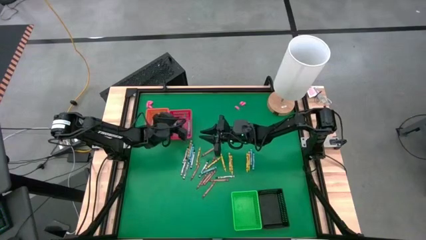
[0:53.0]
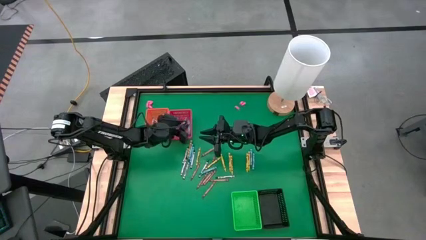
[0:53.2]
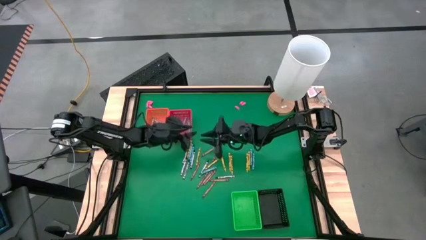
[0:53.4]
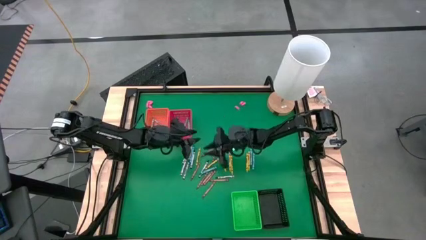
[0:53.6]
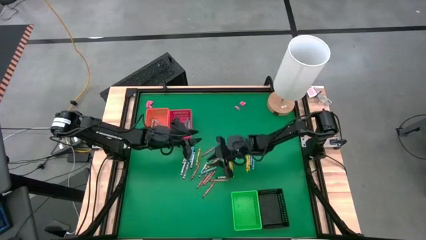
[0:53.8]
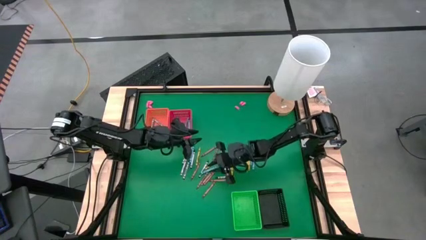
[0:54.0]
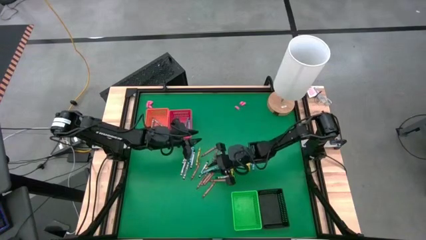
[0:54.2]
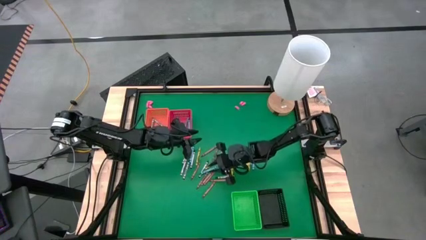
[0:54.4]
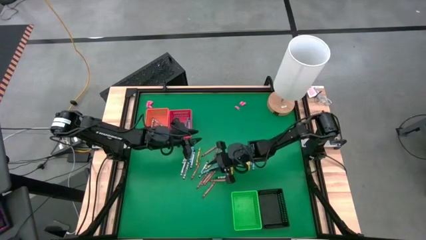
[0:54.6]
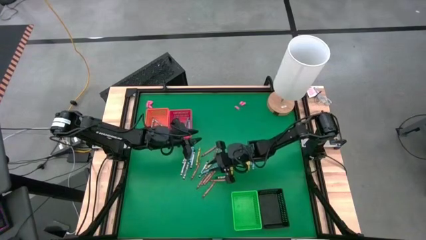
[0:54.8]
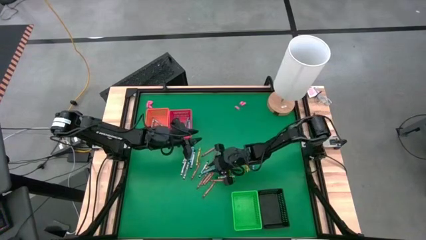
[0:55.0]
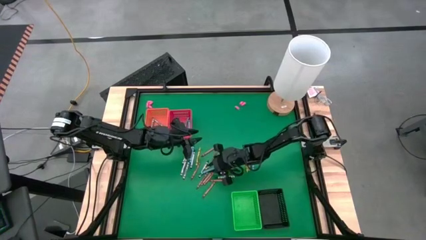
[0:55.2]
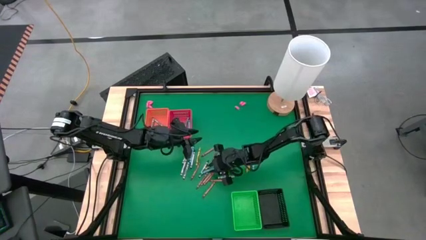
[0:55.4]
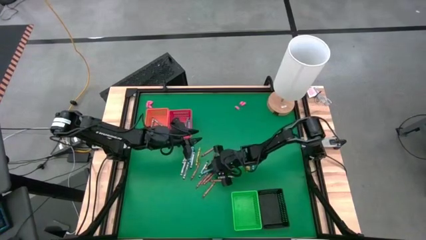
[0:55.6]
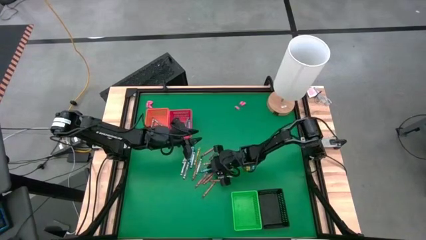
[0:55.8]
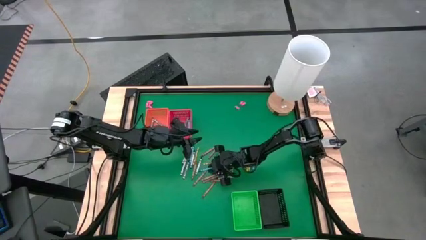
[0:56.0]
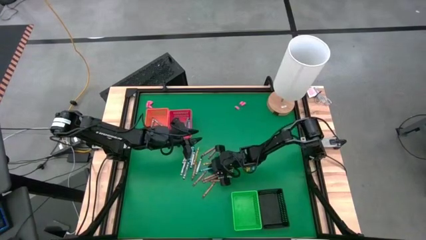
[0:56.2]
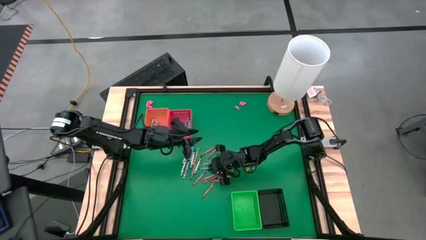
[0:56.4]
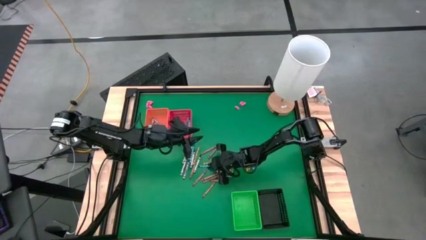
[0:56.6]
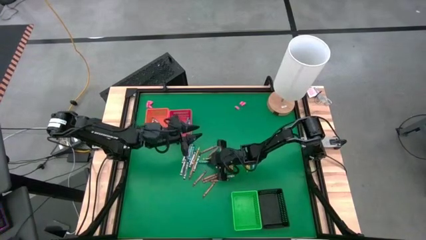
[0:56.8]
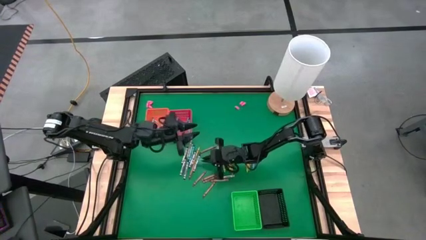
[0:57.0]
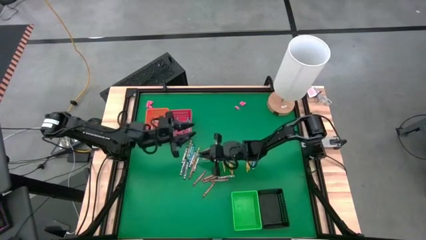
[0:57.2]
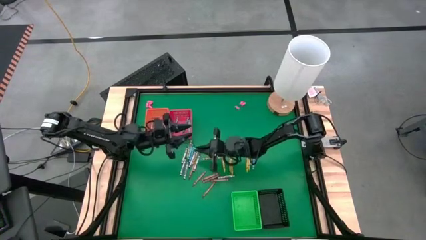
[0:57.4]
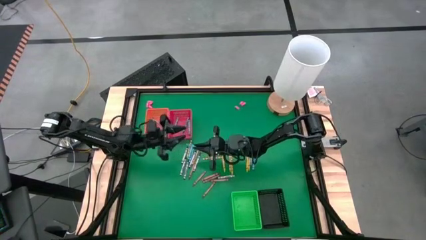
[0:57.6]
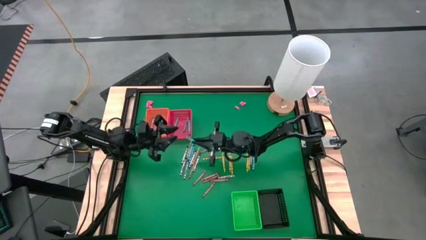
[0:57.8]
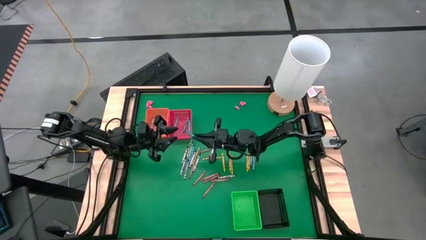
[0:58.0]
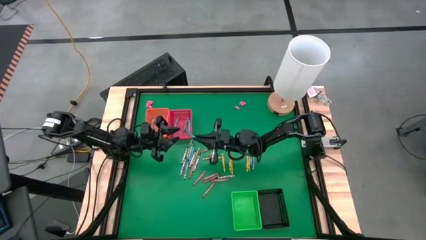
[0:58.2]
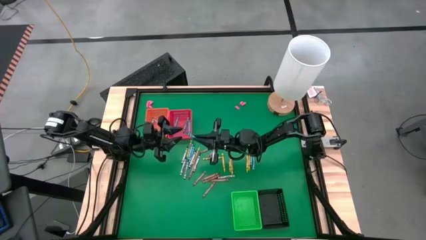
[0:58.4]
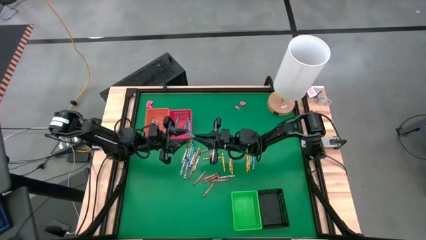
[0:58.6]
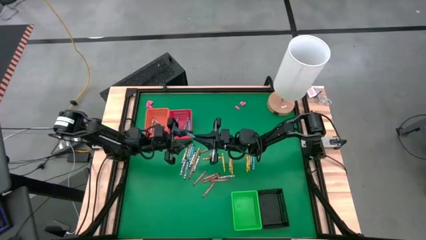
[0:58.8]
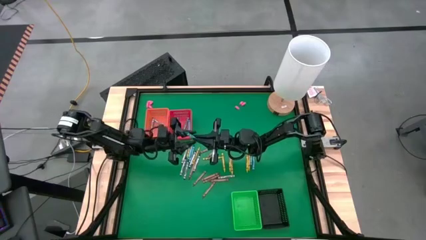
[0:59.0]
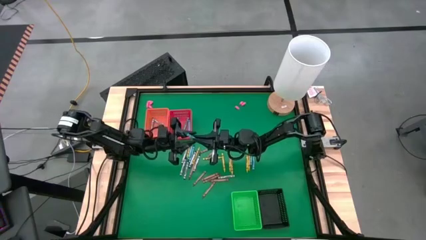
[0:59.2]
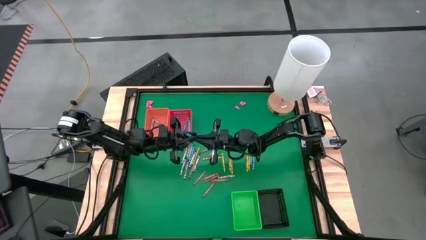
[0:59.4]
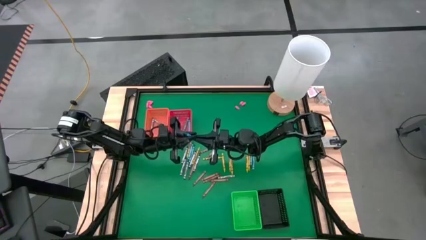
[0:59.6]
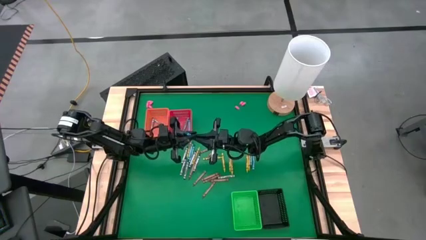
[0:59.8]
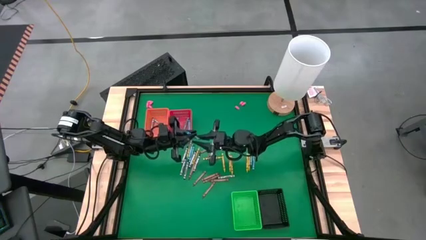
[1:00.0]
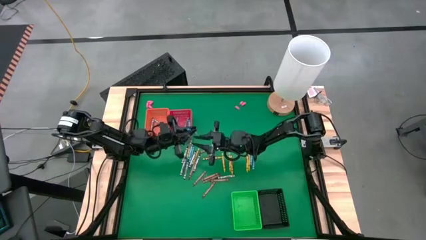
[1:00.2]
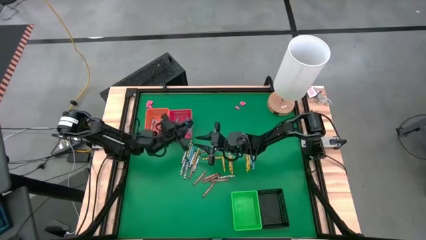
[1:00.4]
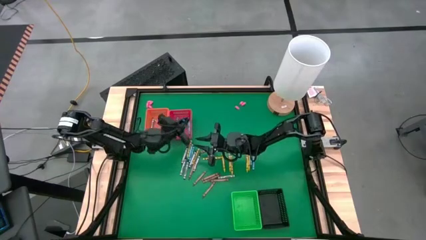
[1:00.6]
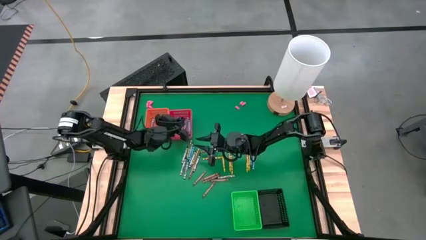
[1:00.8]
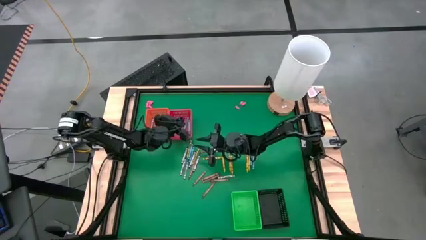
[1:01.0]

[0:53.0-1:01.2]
Task: Sort crayons
Put the blue crayon into the red bin

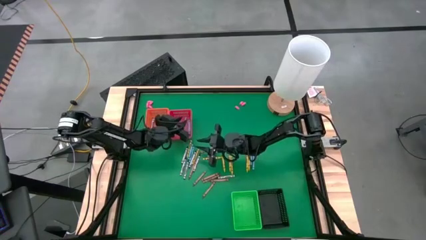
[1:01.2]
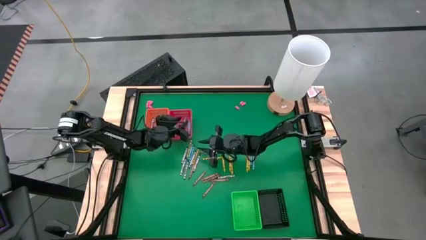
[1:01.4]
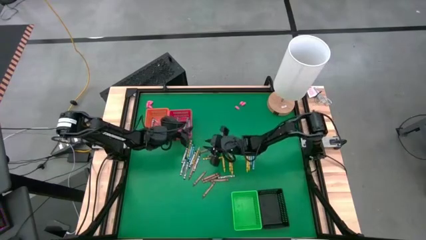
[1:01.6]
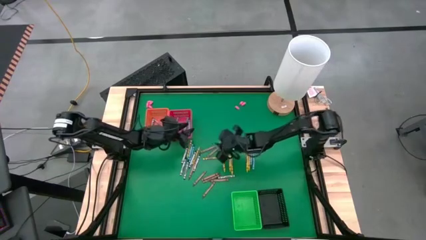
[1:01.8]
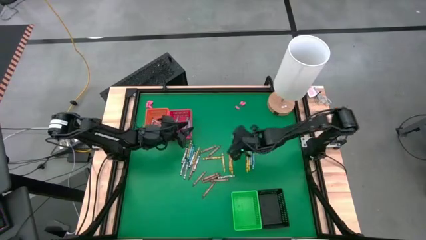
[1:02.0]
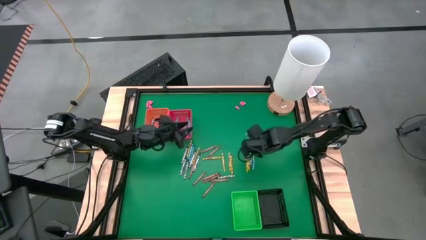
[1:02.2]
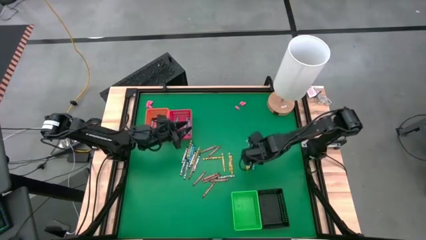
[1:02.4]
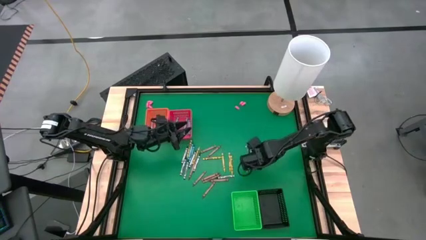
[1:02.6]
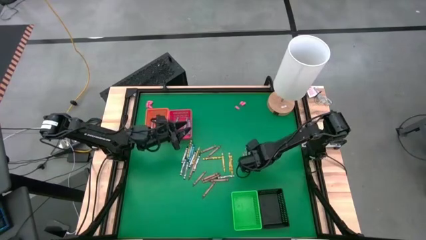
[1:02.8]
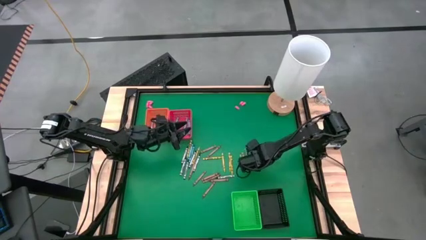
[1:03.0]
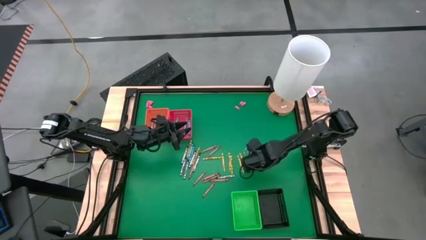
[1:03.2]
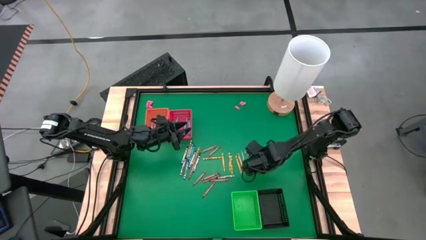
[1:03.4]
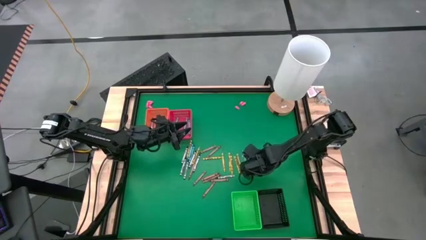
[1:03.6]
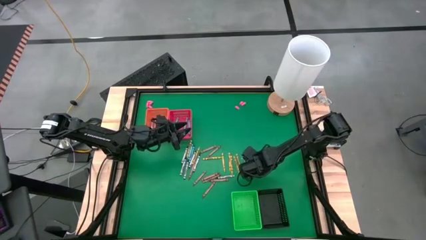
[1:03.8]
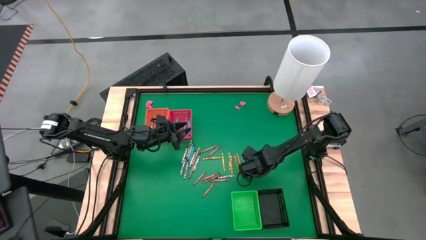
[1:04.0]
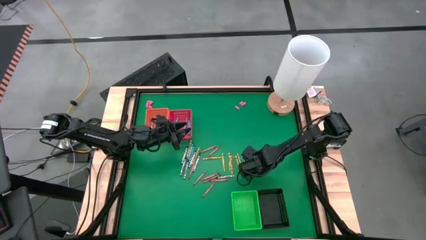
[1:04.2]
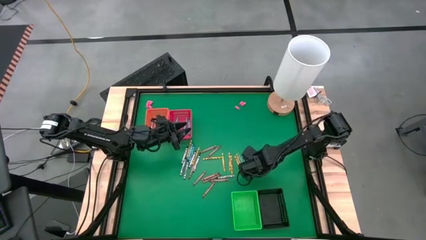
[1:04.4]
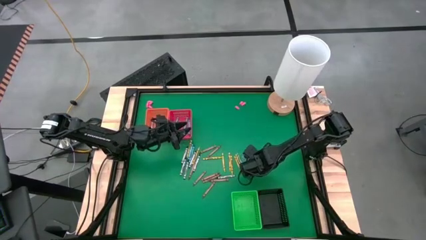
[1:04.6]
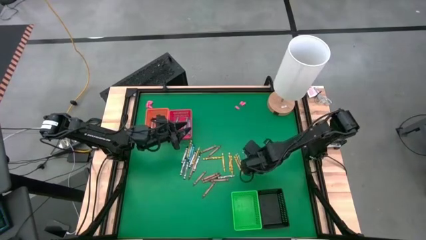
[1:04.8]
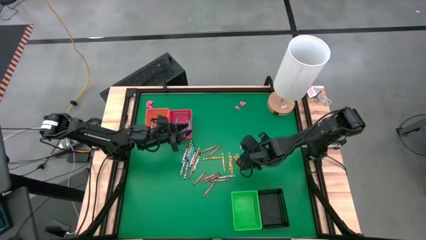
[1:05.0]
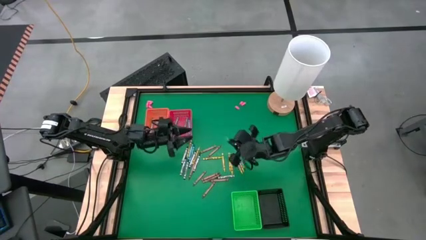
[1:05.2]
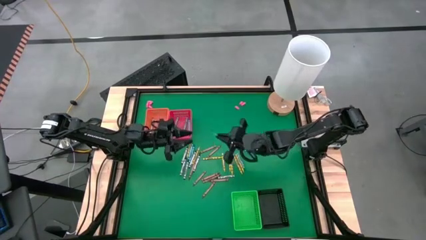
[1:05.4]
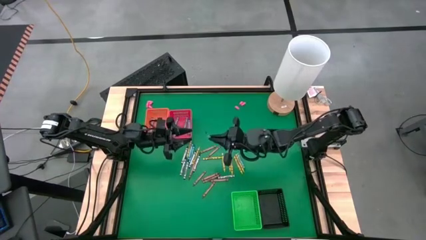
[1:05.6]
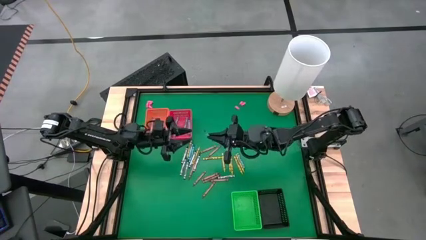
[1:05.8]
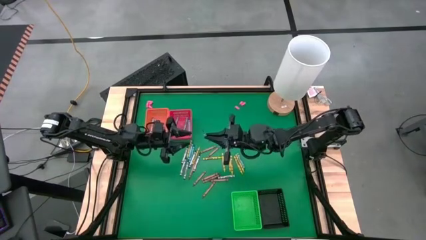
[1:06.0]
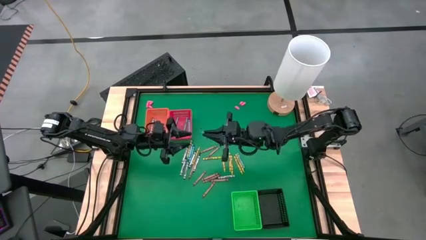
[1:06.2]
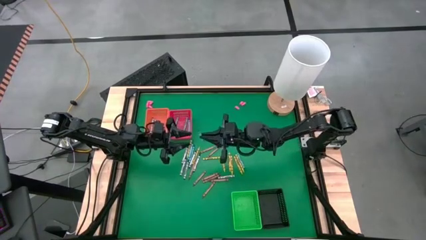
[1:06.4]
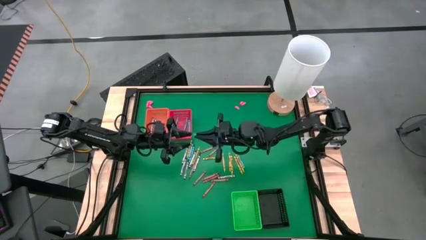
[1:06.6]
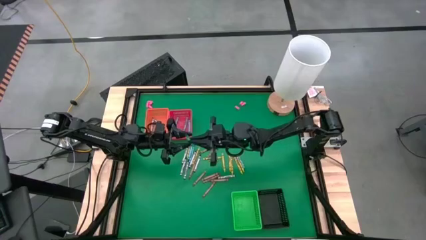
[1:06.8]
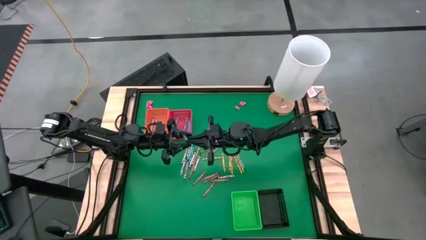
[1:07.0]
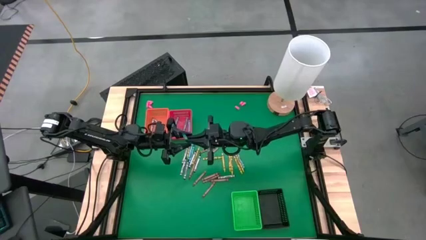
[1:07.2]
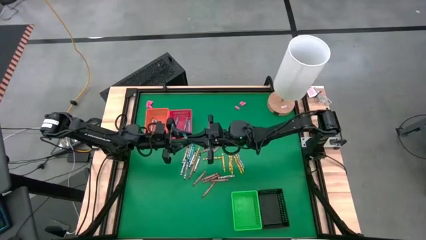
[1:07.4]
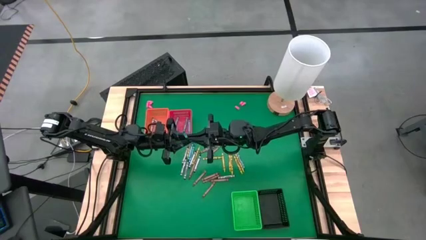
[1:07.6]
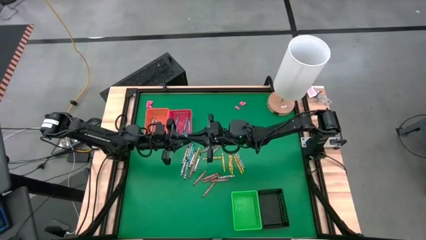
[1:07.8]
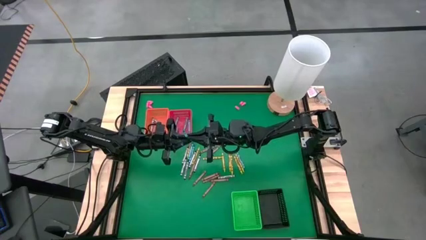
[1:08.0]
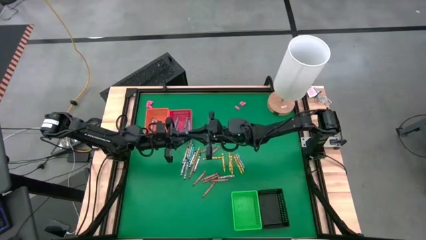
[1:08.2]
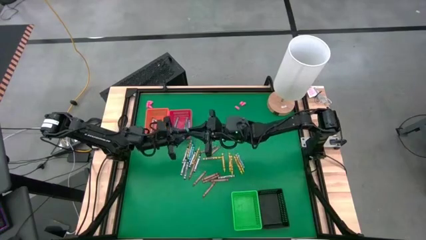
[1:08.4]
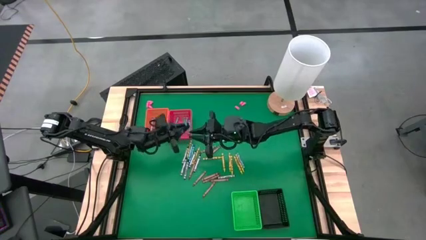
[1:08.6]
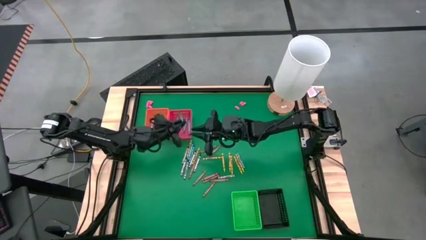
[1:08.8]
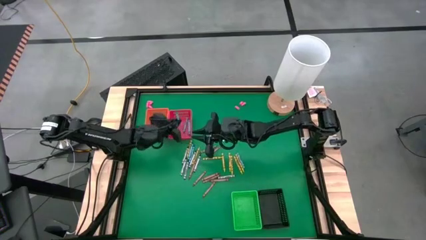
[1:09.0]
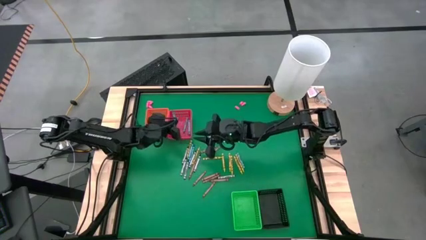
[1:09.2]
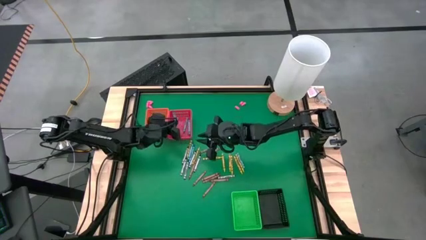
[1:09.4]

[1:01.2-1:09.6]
Put the blue crayon into the red bin
